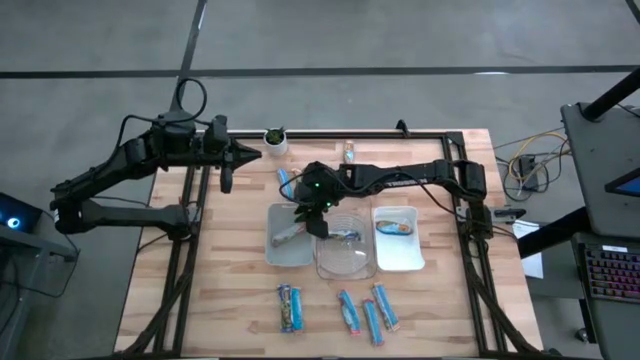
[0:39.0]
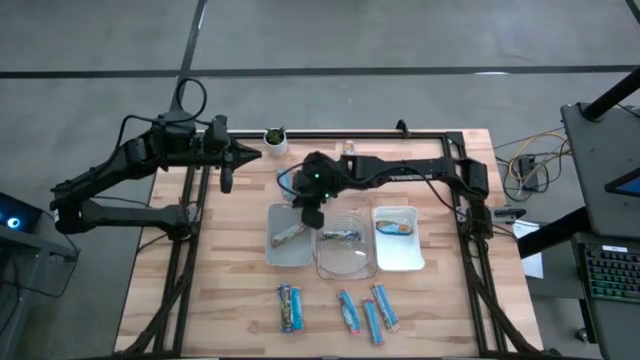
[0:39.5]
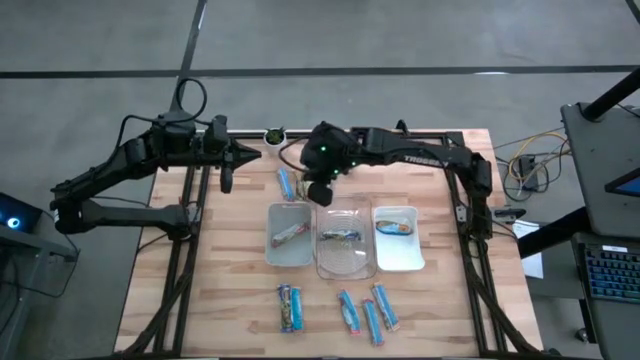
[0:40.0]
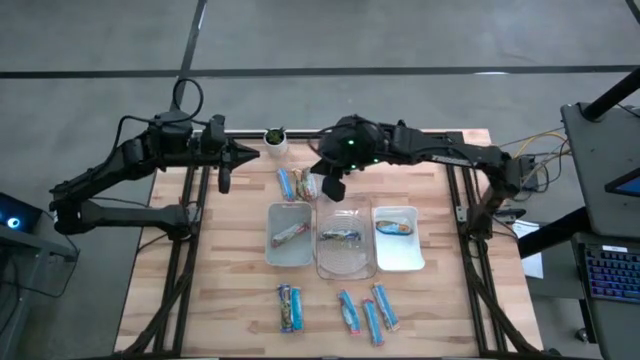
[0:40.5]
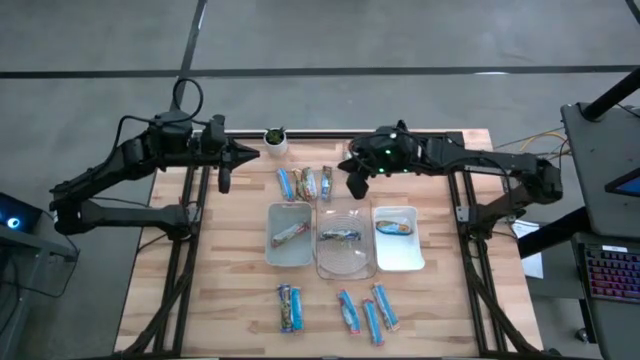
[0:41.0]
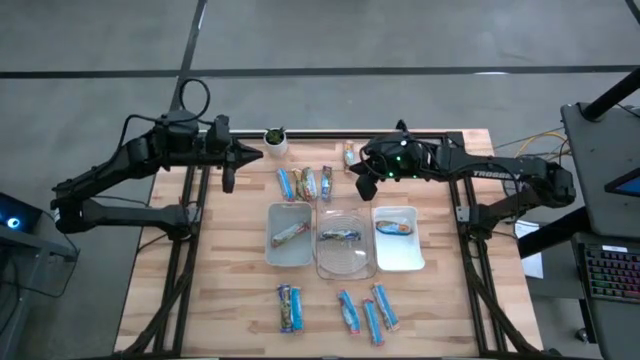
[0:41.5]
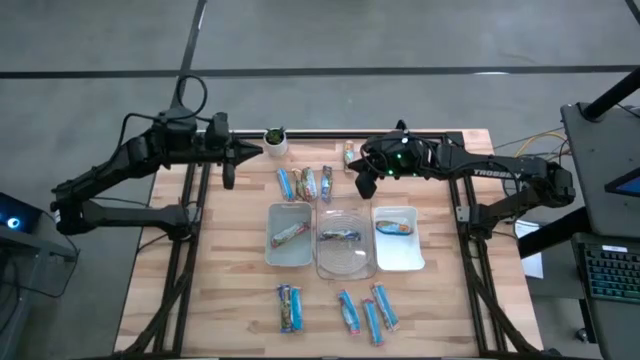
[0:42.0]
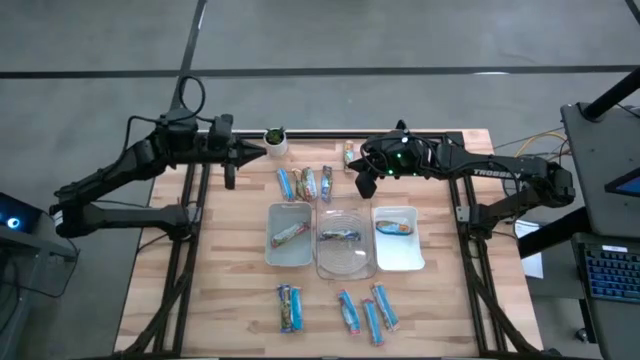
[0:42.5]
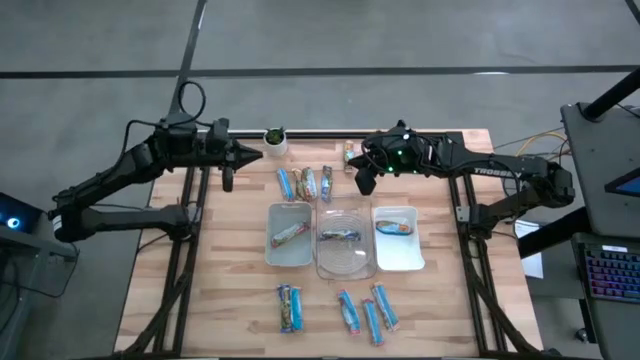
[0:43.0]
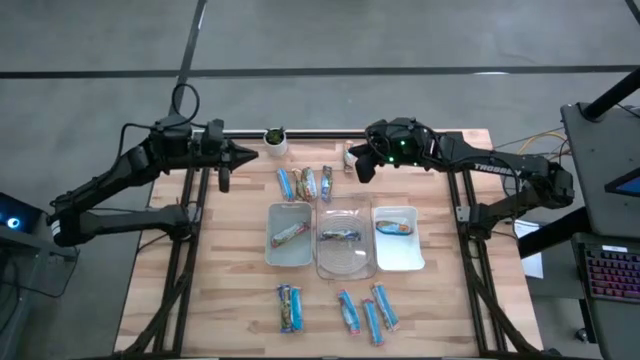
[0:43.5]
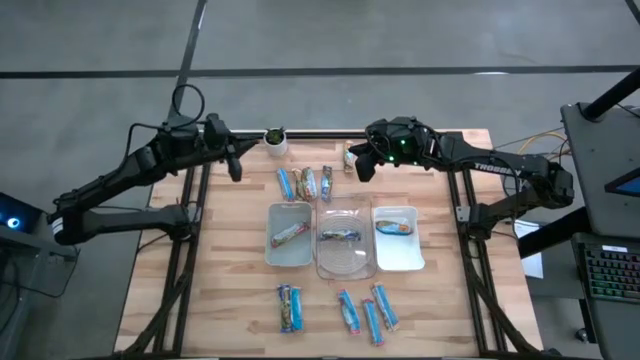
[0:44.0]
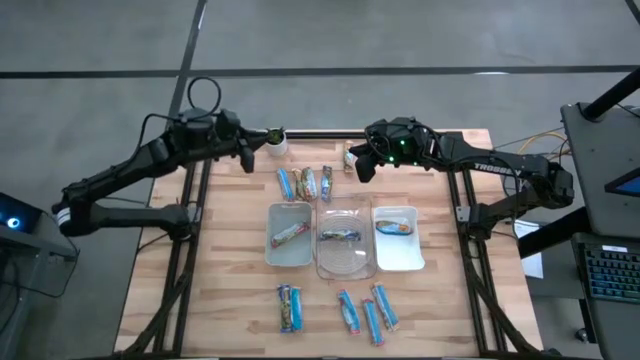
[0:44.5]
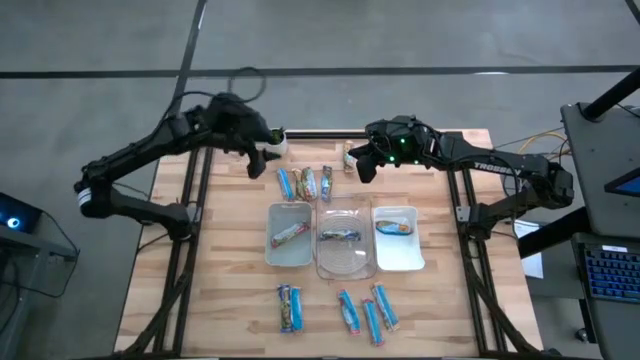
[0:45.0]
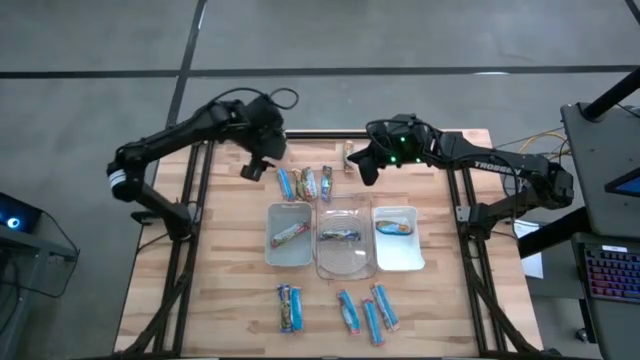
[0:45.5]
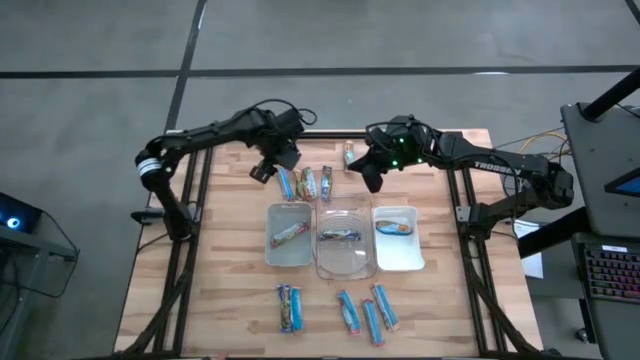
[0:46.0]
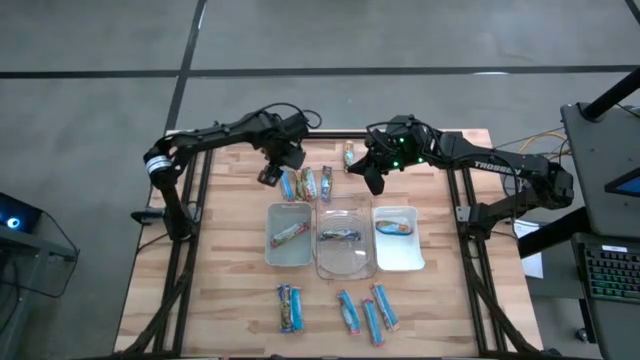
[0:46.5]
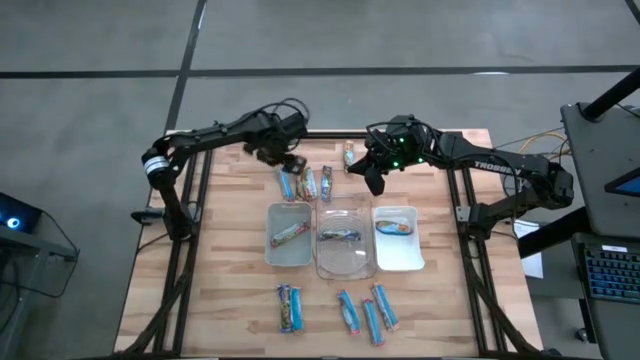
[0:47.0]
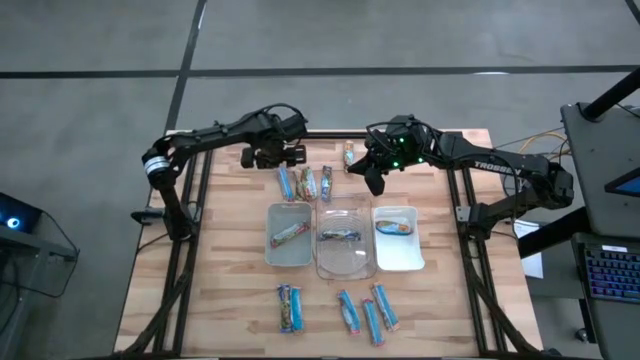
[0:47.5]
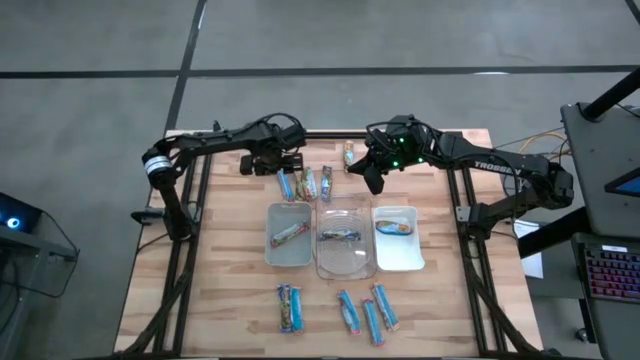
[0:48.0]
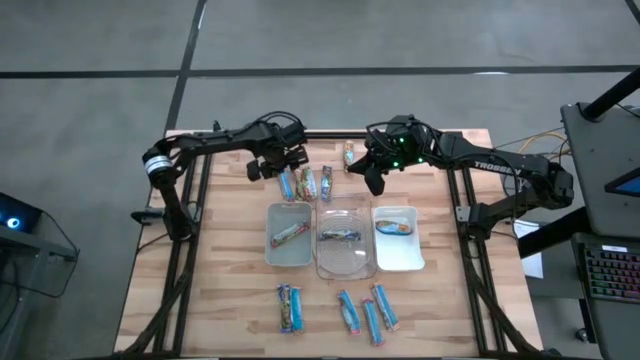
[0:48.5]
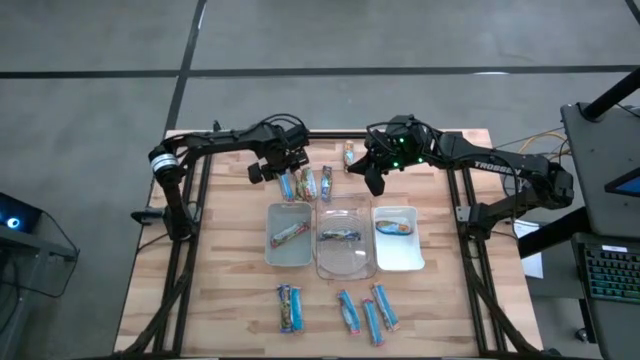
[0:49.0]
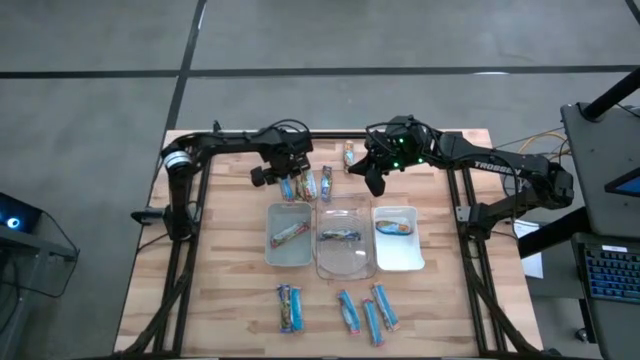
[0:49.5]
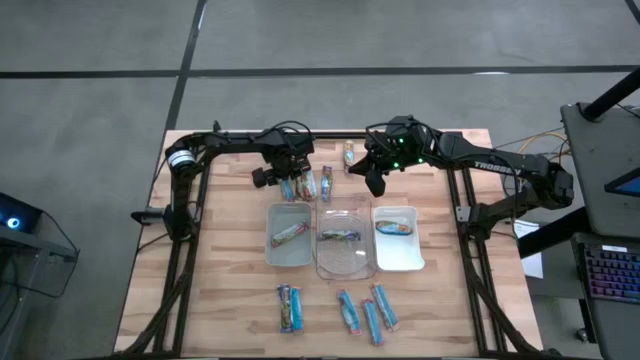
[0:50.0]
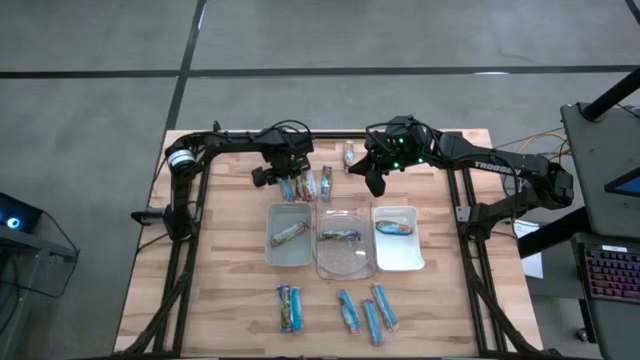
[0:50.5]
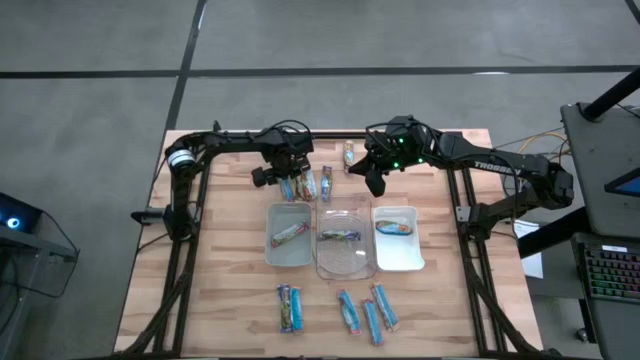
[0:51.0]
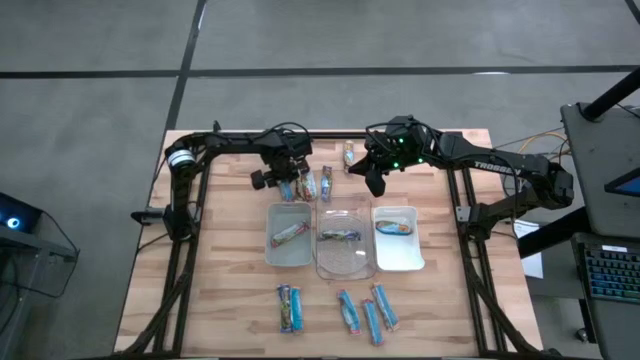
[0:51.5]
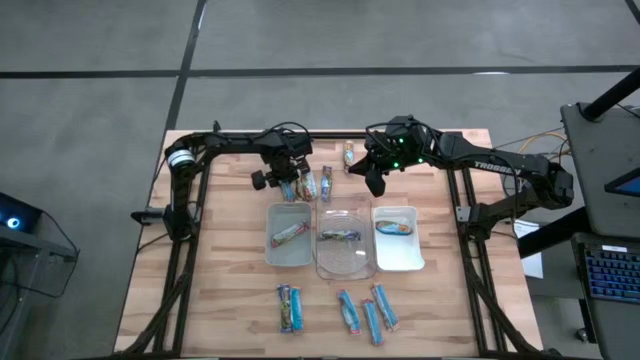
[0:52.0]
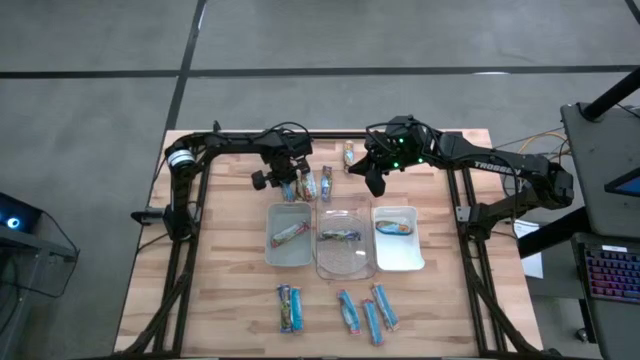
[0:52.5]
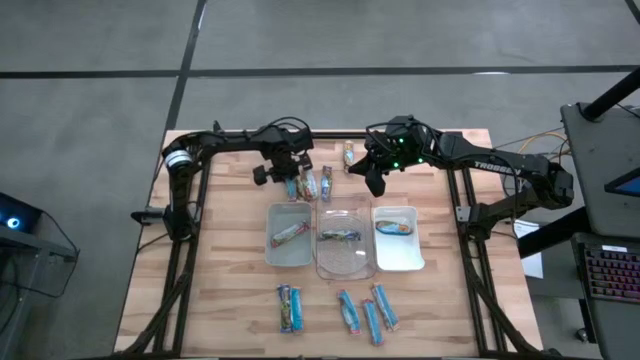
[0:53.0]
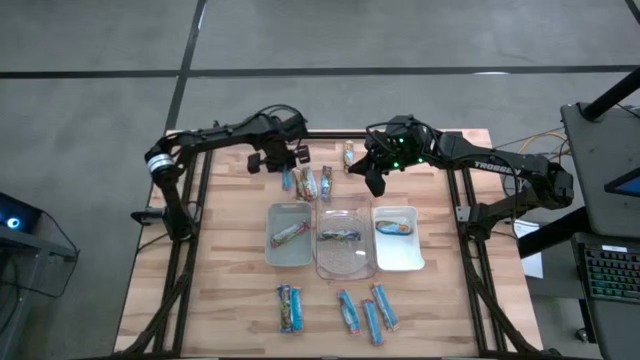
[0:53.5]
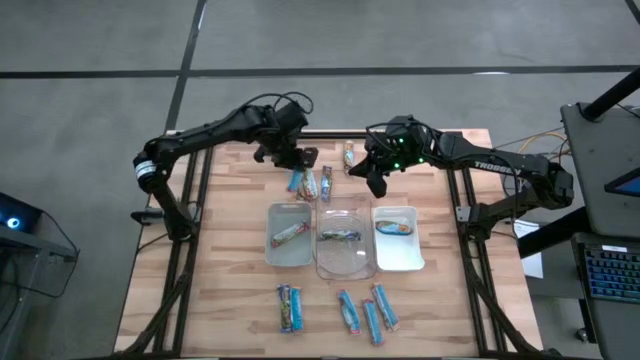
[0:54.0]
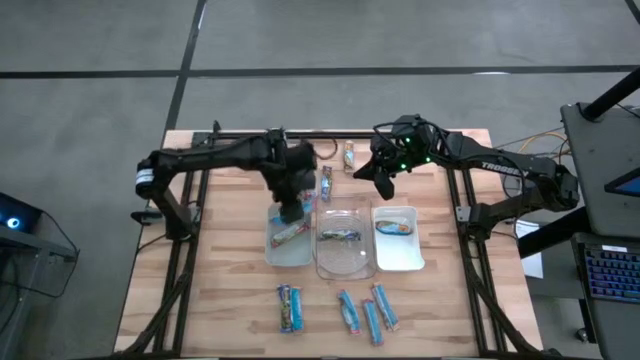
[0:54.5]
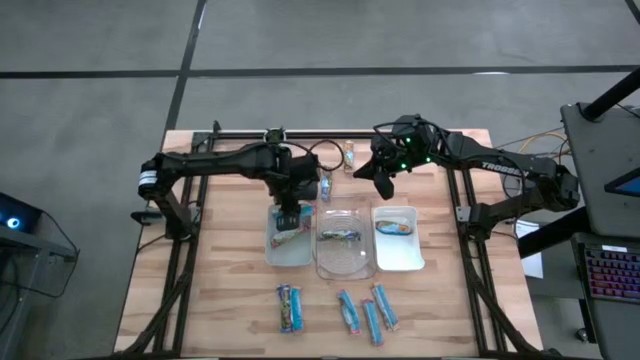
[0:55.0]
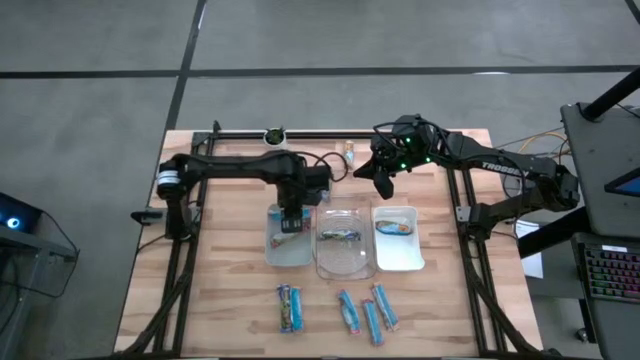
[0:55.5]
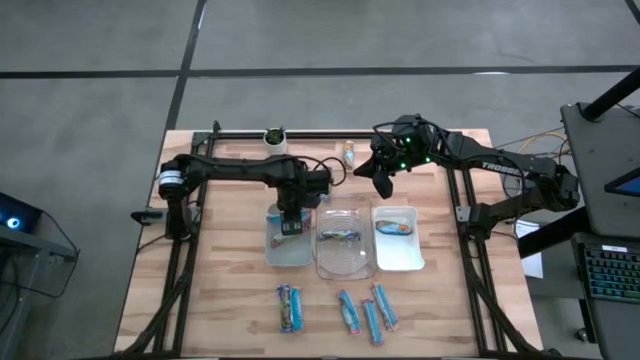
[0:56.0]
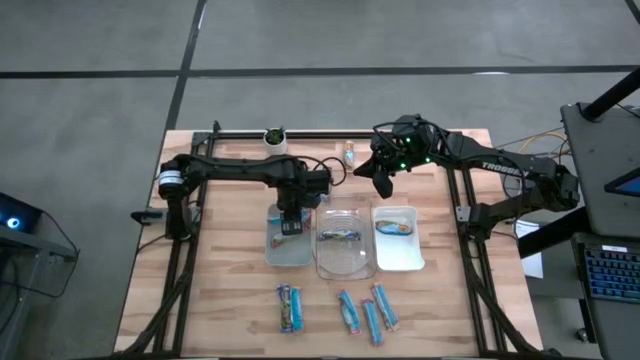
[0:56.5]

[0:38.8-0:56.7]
Task: Pick and place Granola Bars by type
Put the red granola bar into the gray bin
